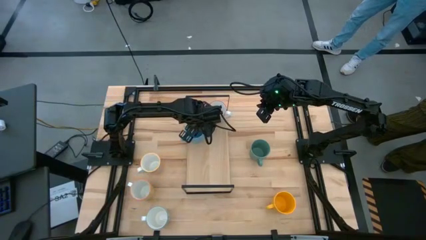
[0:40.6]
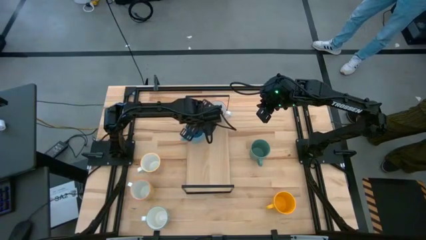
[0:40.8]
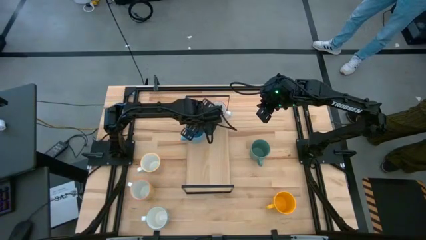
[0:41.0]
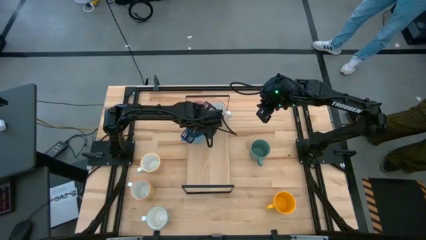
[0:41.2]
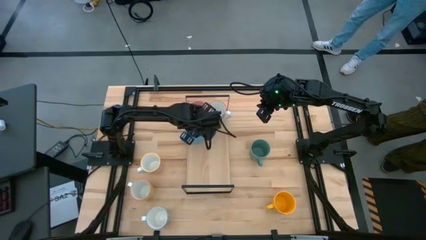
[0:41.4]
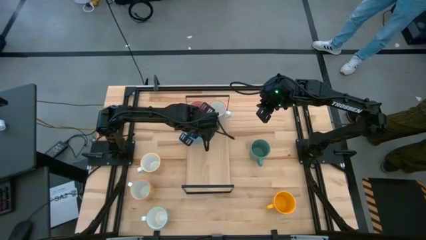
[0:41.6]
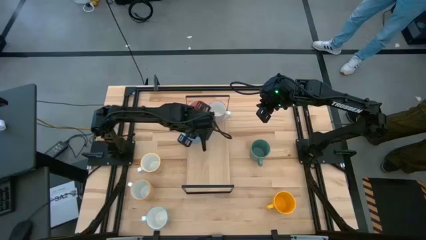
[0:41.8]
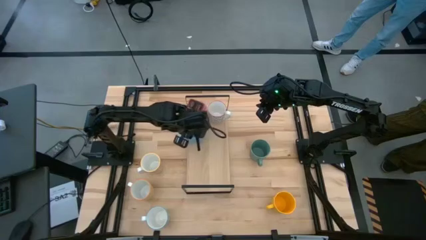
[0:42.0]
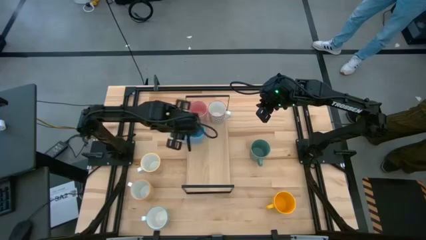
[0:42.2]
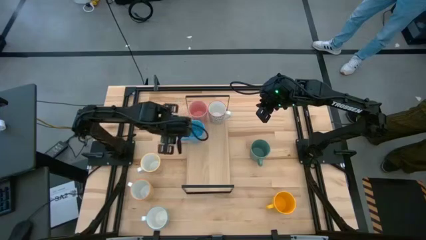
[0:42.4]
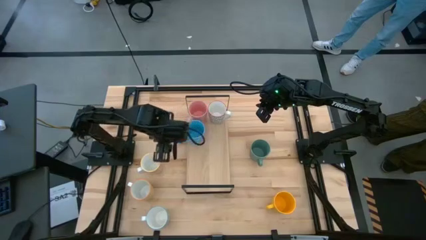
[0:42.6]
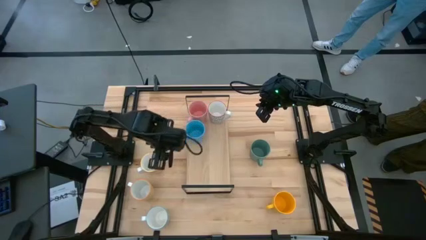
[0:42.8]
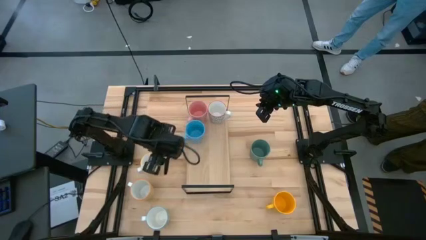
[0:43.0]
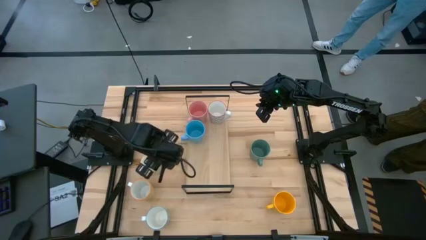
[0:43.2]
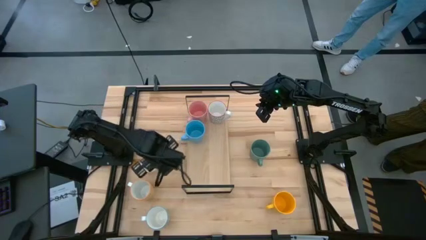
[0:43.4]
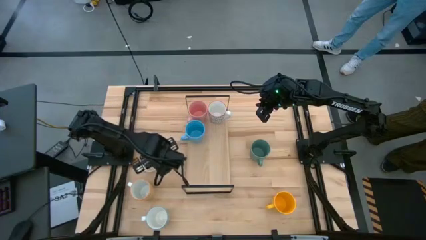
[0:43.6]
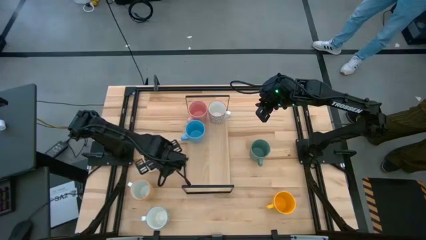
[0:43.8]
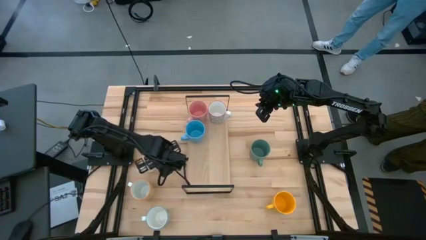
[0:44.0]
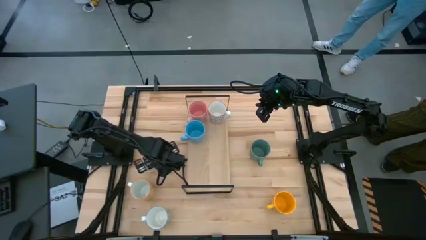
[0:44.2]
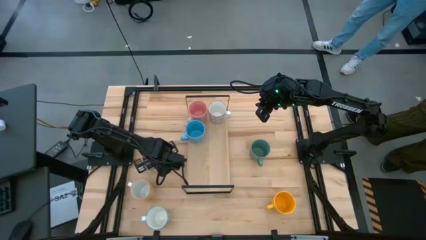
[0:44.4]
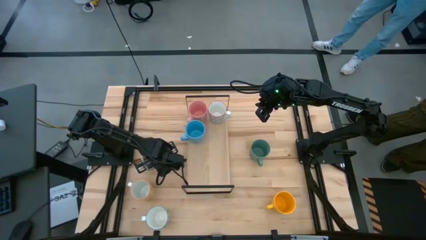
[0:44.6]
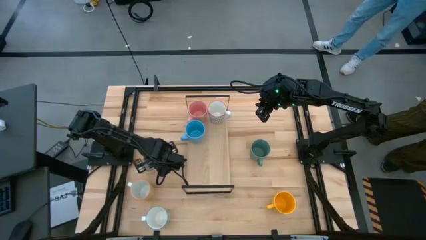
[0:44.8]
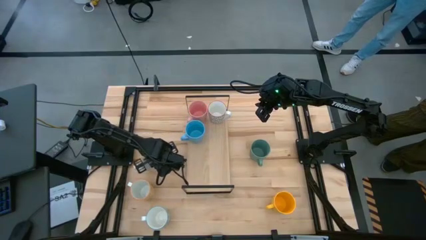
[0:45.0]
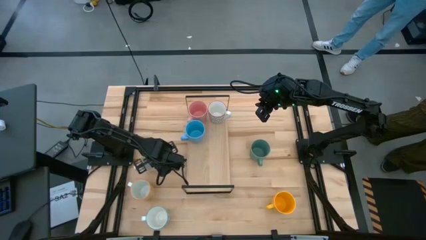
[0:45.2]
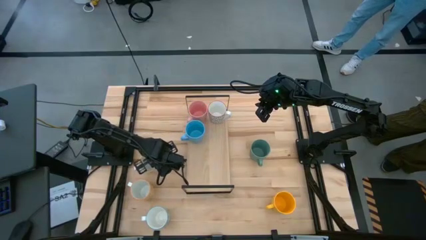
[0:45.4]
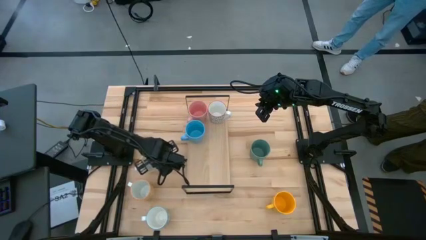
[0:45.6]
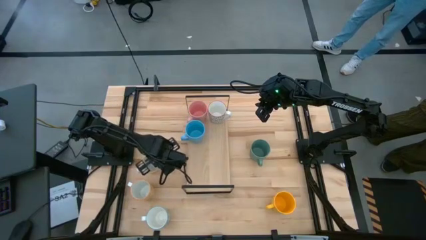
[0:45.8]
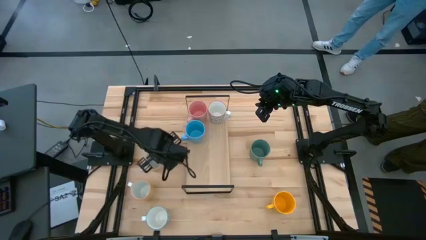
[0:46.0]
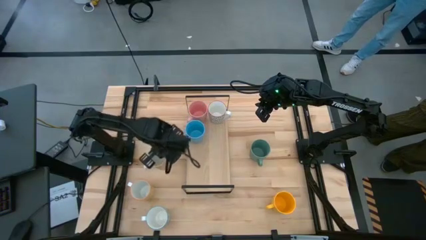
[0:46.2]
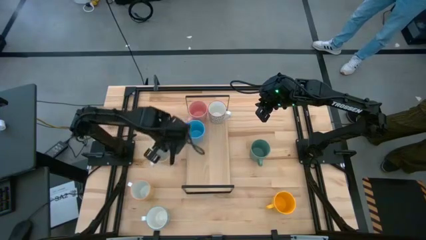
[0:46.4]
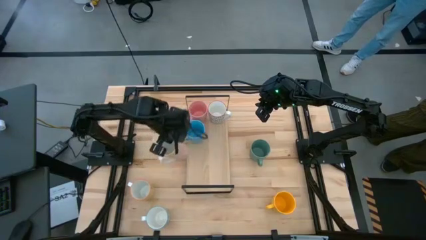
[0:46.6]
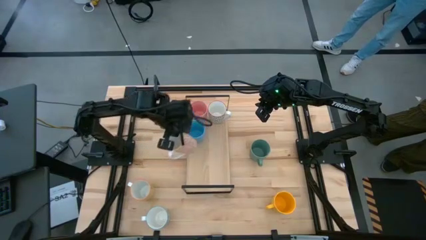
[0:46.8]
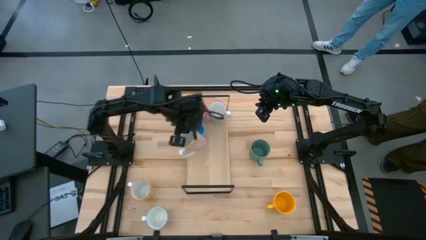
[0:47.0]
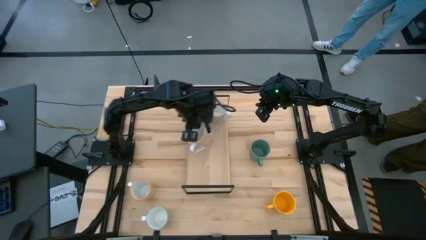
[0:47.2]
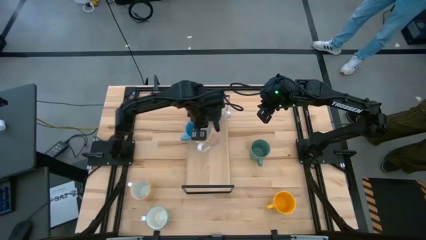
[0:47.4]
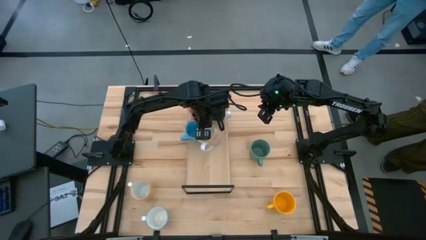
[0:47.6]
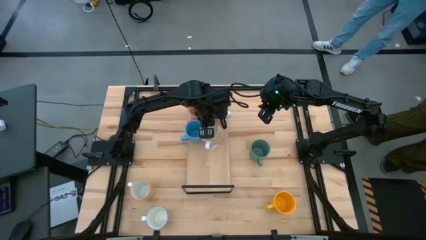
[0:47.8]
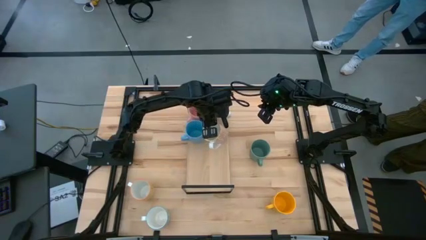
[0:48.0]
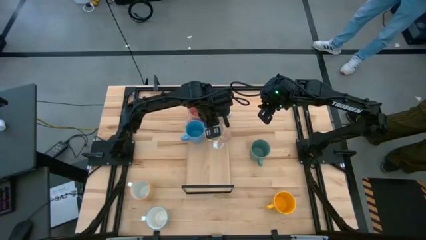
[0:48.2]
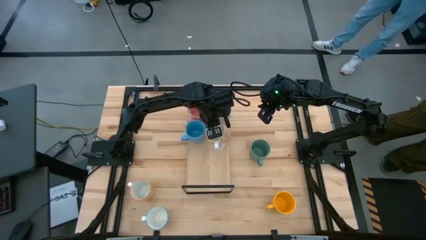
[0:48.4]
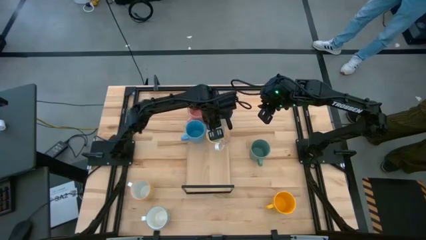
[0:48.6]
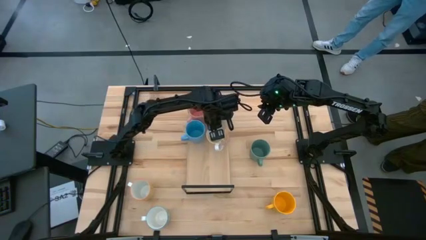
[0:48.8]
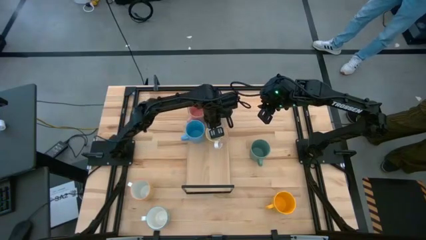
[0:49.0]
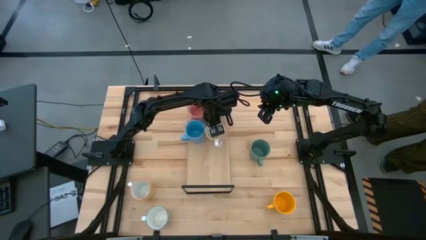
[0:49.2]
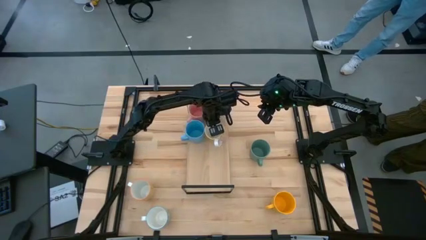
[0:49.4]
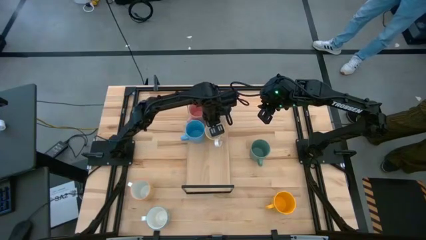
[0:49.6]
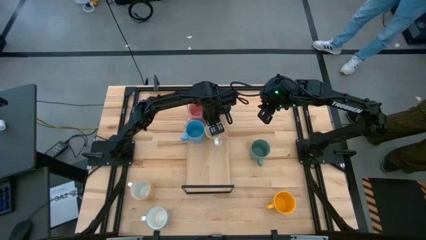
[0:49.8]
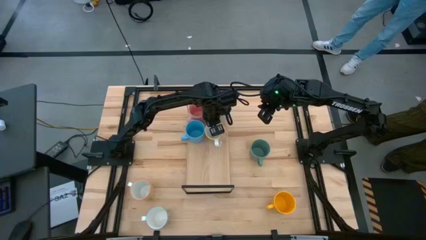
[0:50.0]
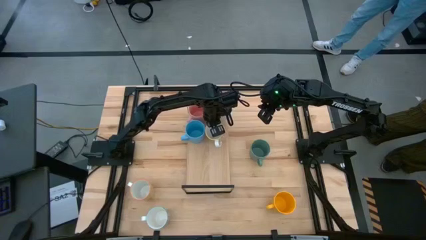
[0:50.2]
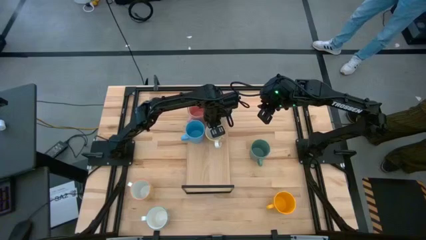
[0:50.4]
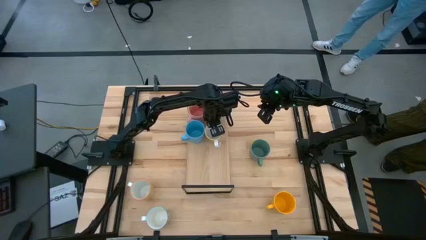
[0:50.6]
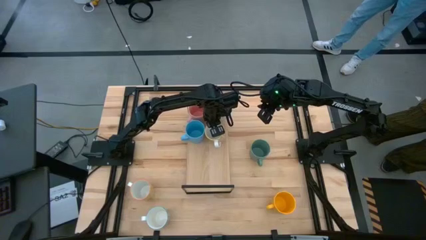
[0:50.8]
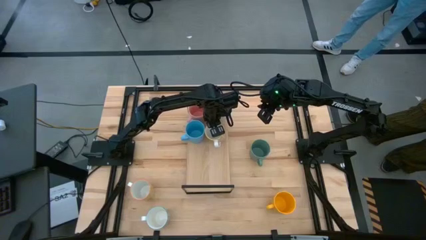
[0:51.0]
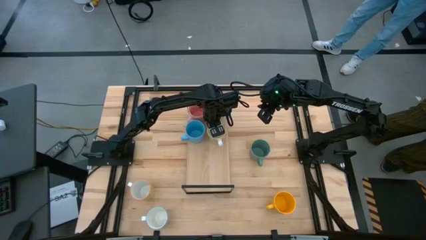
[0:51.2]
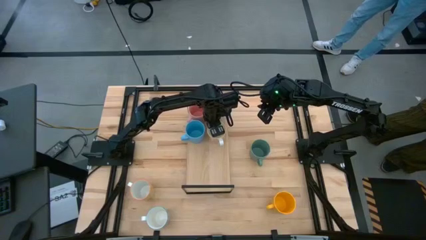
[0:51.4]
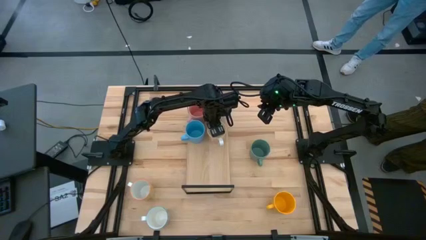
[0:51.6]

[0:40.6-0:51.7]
Task: Place coffee mugs
Put the orange patterned mug on the shelf

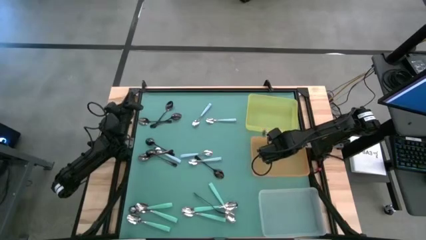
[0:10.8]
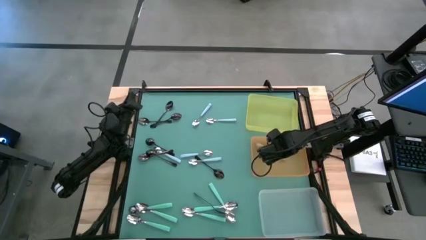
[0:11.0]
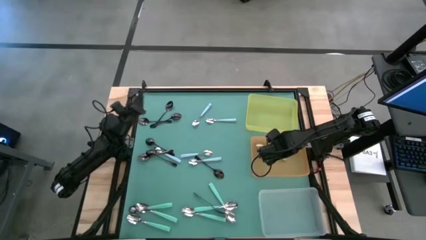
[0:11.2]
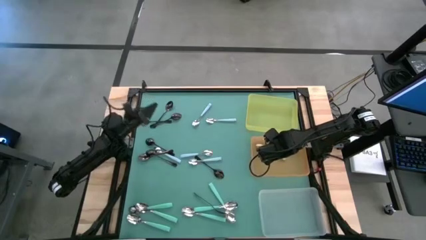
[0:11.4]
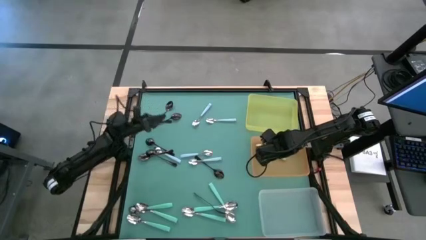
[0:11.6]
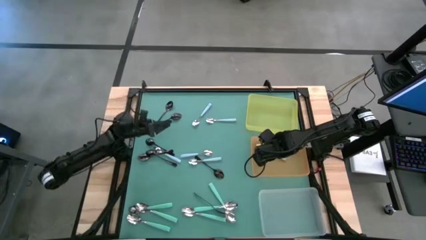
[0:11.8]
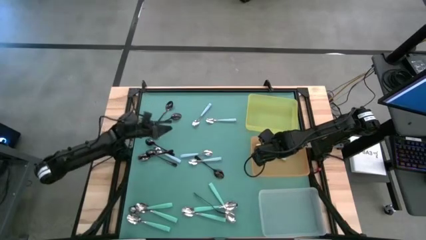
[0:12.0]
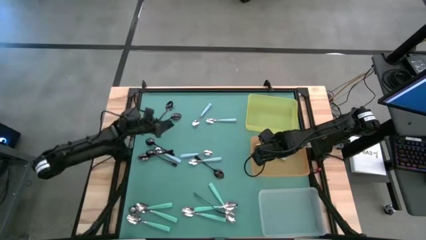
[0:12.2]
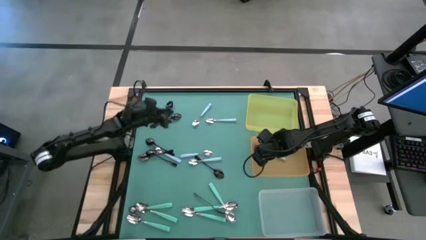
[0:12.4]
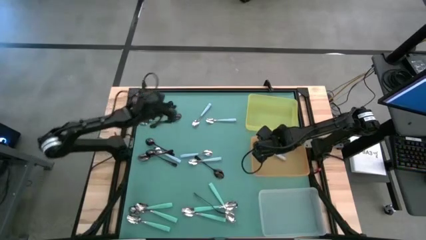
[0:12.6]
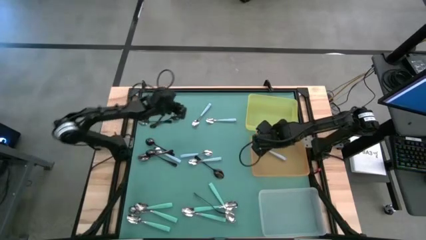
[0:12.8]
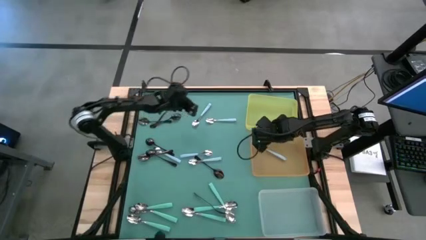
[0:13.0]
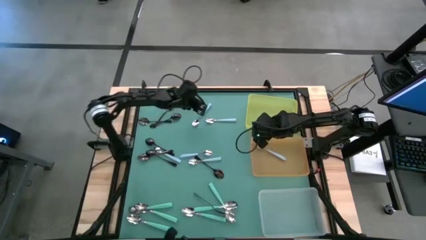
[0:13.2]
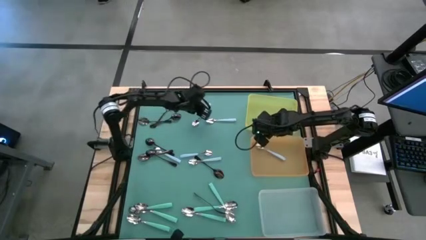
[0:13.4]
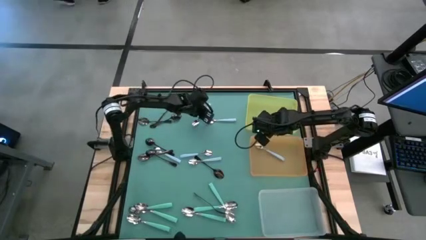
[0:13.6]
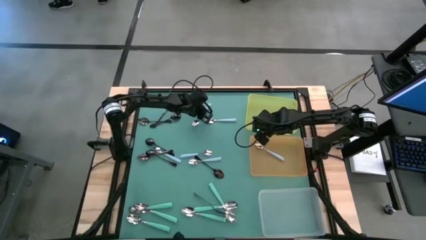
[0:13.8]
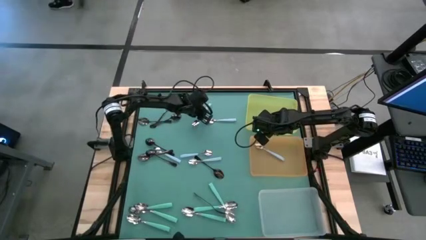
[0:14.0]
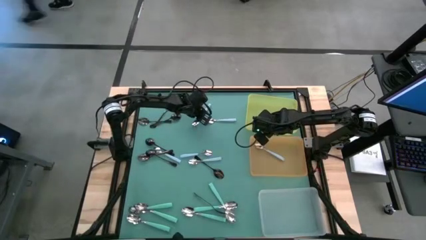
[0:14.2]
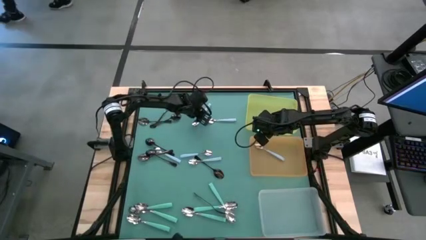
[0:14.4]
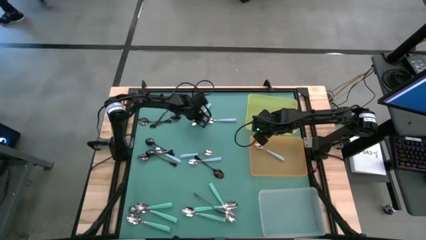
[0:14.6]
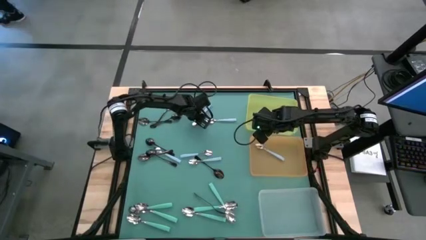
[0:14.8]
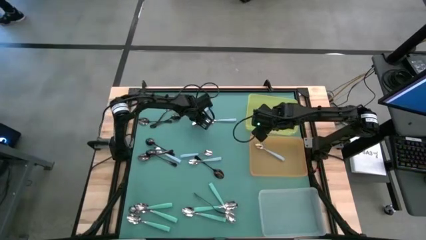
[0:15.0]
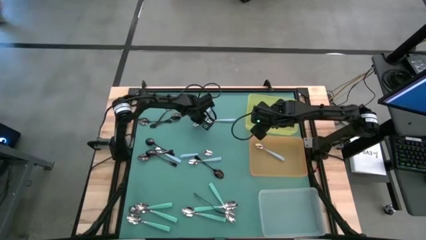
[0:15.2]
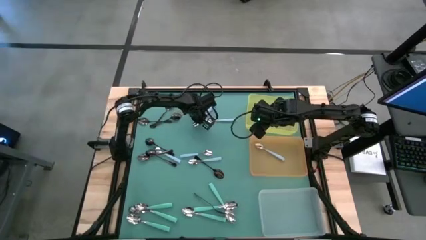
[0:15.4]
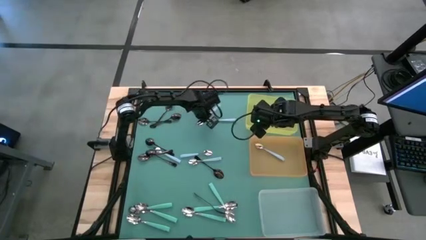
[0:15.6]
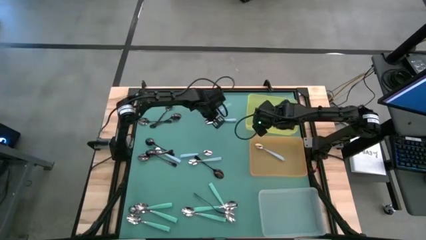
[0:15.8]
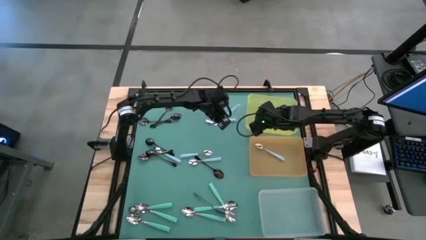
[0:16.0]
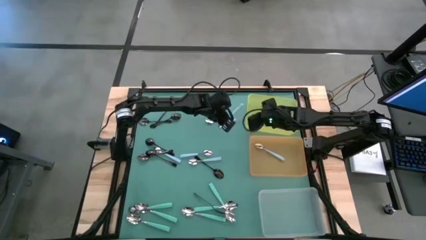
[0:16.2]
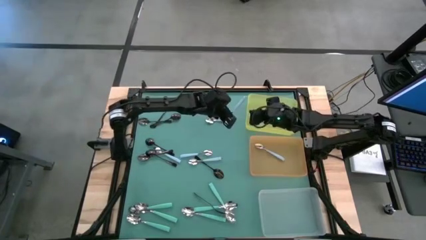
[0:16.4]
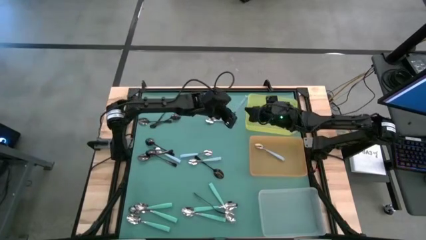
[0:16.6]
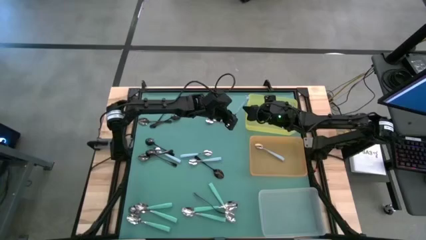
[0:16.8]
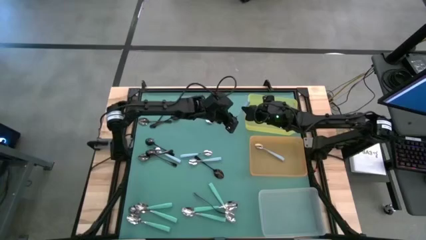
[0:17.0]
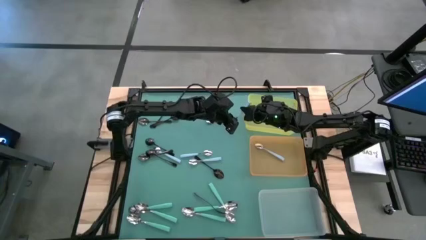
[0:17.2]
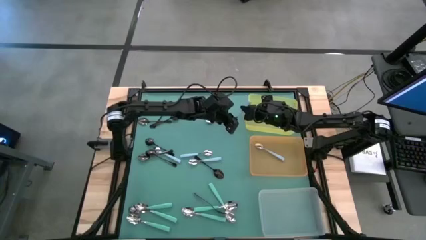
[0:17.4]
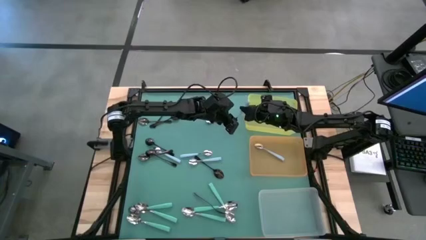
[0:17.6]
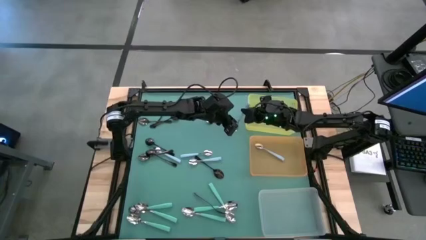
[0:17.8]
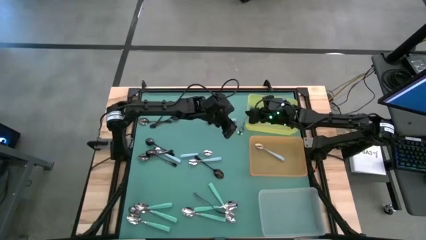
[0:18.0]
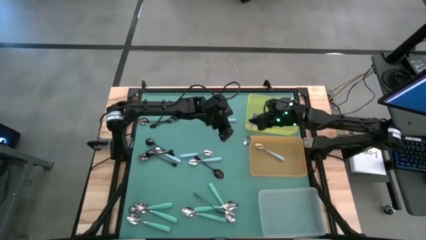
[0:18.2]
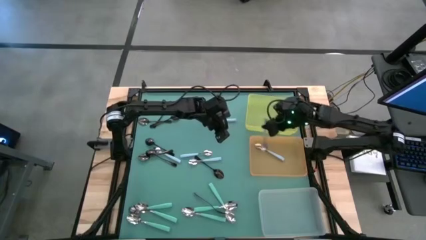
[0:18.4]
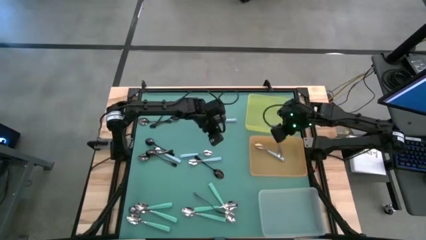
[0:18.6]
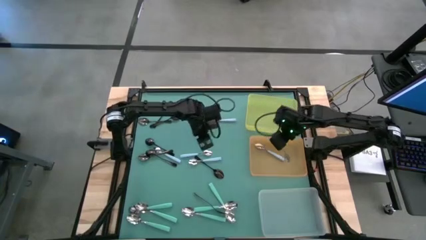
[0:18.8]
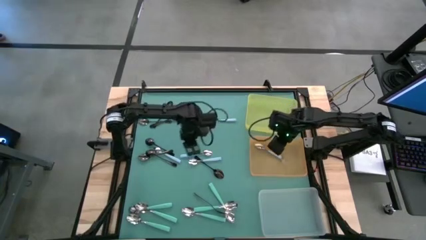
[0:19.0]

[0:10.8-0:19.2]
Task: Sort silverware by color (type)
Put the blue spoon into the orange bin
